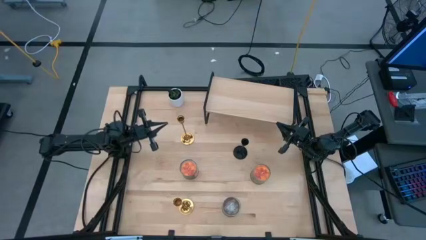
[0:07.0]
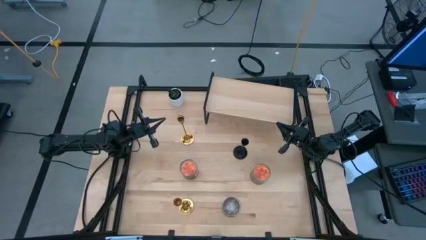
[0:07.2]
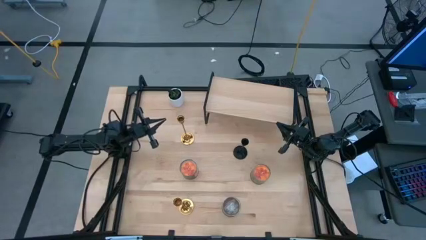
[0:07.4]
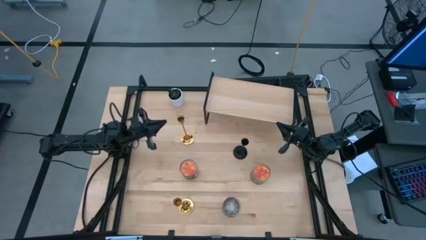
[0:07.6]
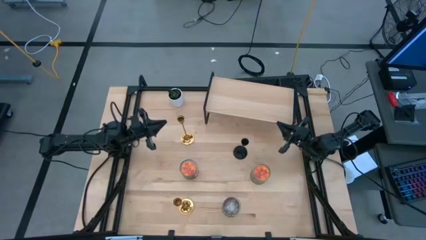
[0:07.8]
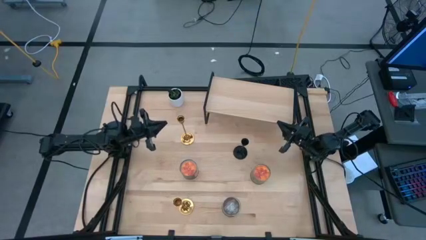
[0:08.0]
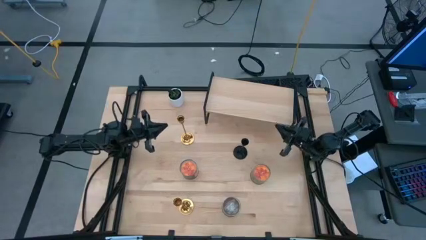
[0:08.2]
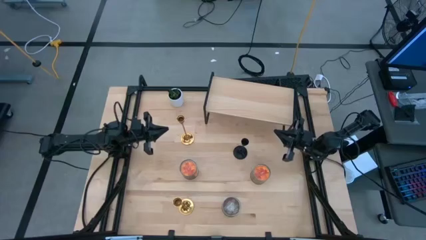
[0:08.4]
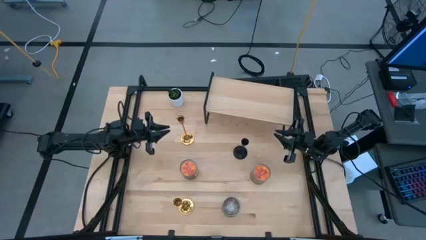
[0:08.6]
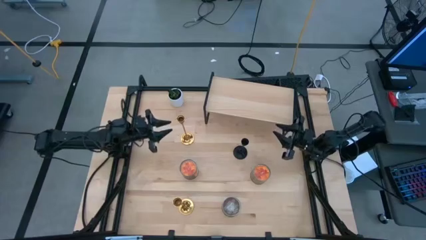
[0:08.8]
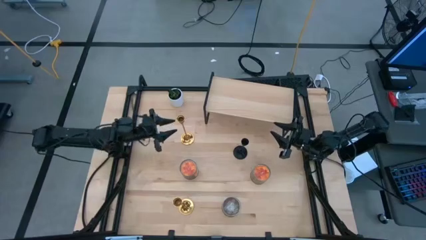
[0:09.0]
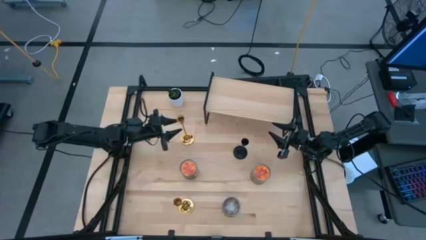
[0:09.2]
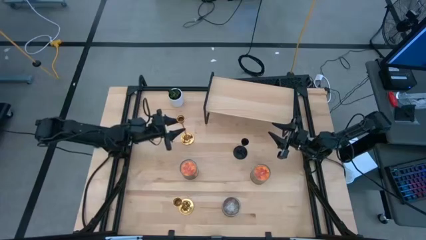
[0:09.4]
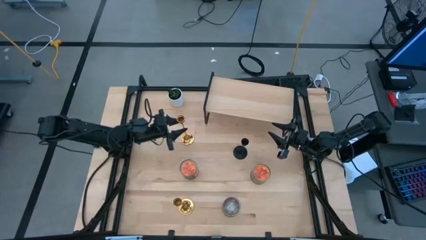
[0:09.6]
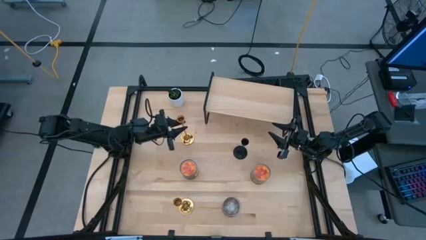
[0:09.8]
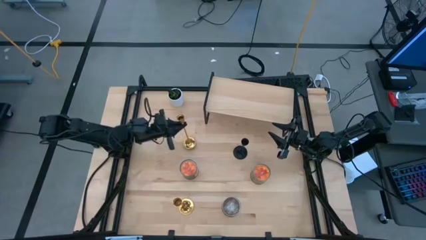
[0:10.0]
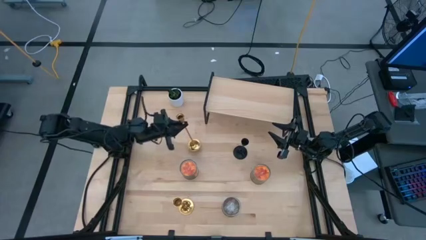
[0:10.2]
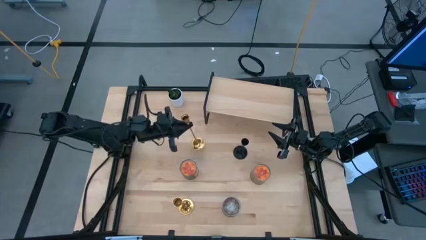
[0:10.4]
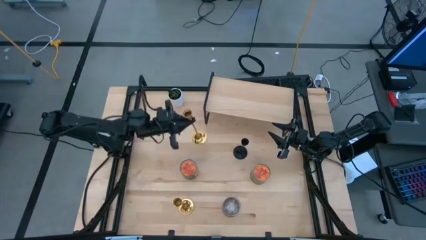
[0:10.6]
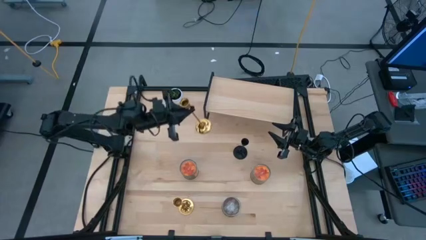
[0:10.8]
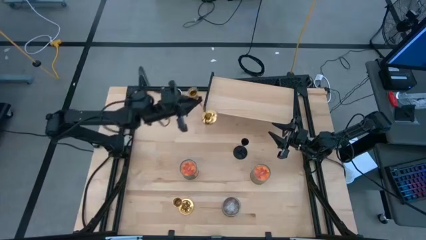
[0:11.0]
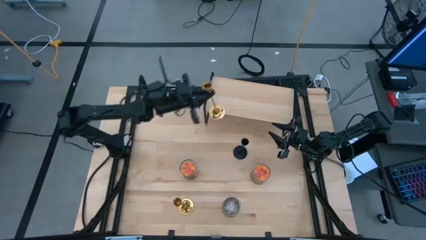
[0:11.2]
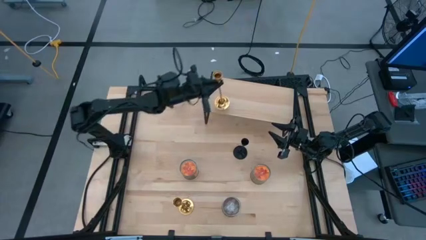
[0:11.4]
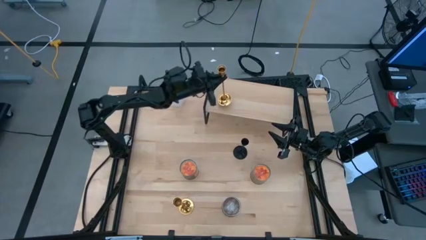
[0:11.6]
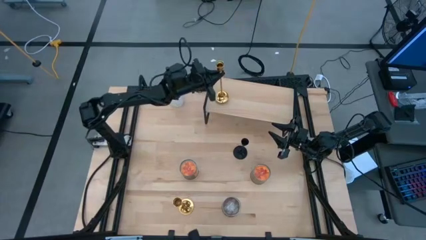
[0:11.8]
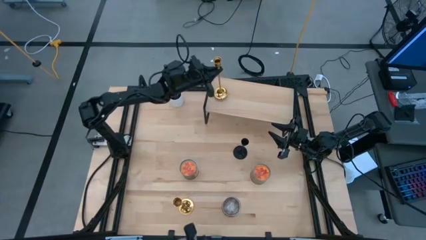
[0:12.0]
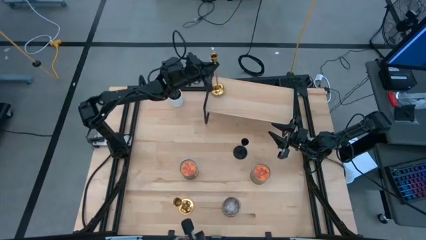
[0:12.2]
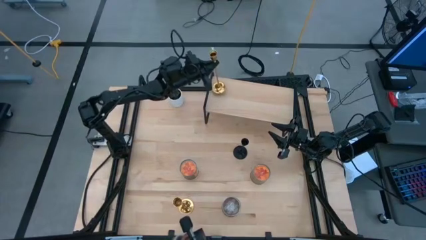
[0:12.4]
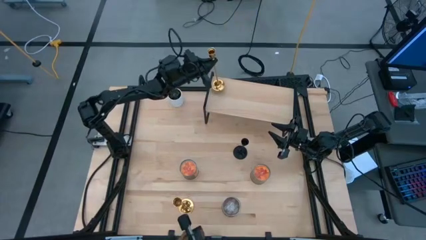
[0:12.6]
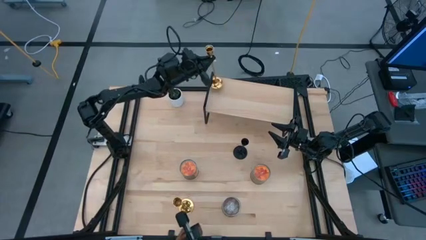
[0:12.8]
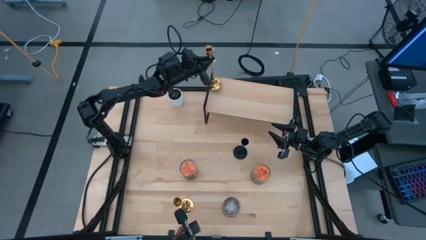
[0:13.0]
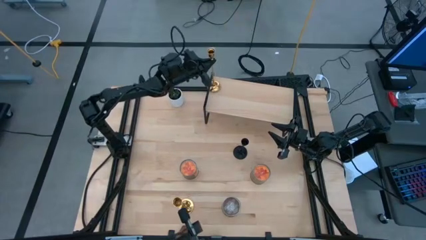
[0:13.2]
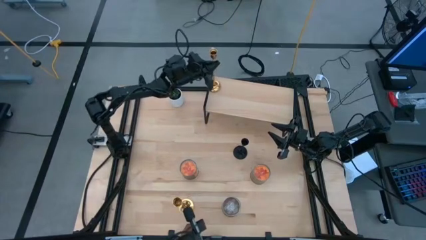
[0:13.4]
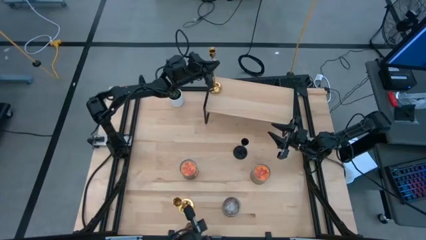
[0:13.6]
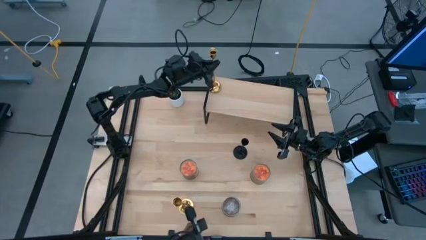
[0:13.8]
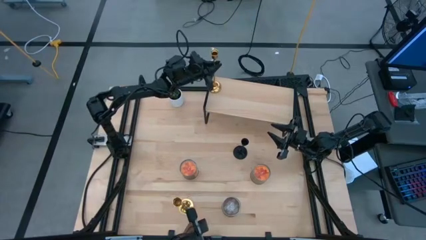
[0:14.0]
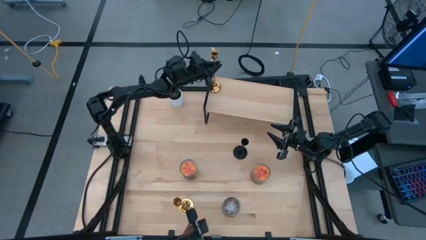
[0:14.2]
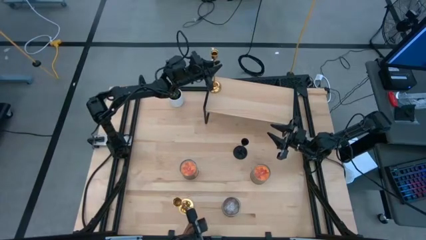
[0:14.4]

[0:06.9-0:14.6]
Task: Pick & Place candle stick holders
Put the top golden candle holder on the shelf

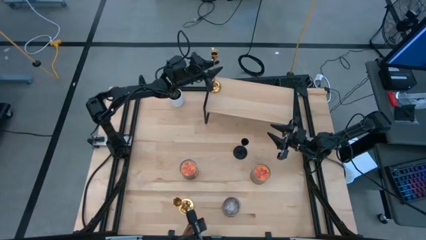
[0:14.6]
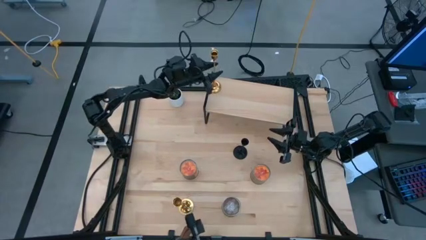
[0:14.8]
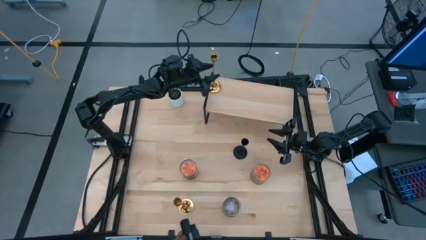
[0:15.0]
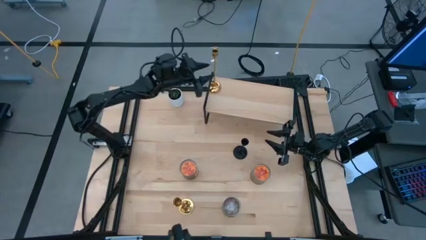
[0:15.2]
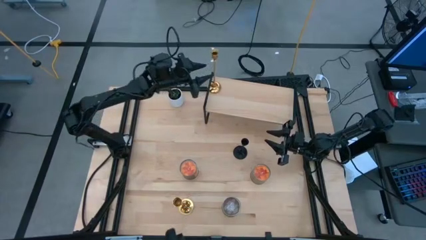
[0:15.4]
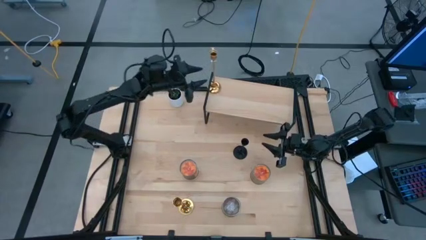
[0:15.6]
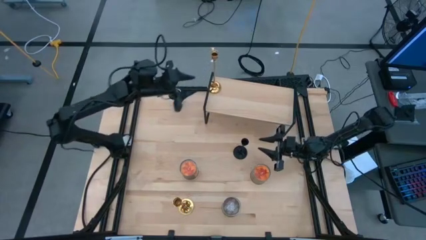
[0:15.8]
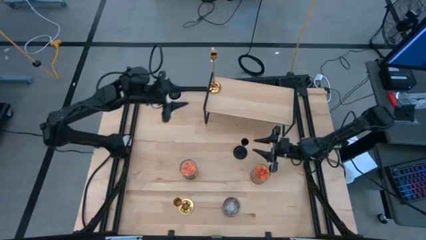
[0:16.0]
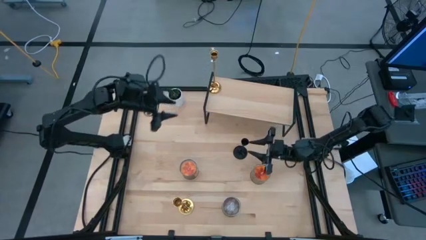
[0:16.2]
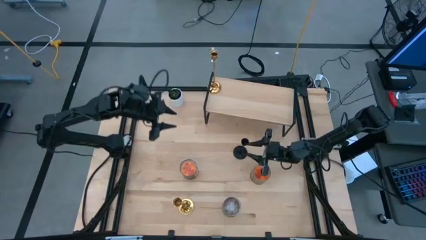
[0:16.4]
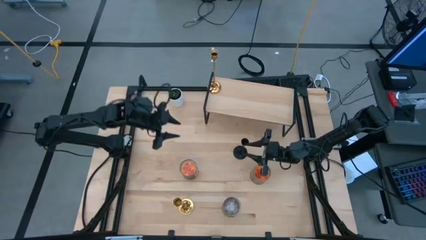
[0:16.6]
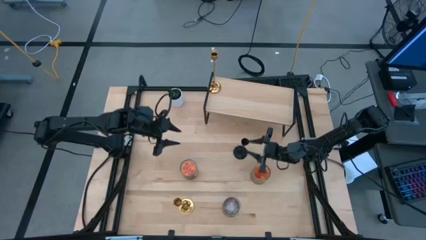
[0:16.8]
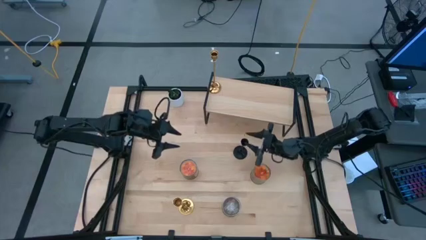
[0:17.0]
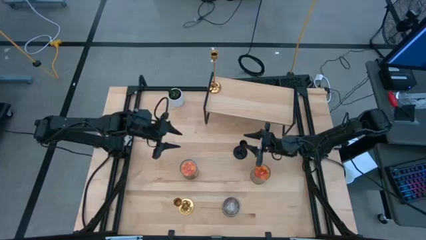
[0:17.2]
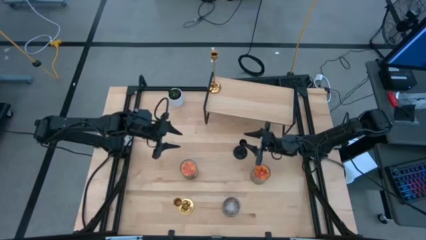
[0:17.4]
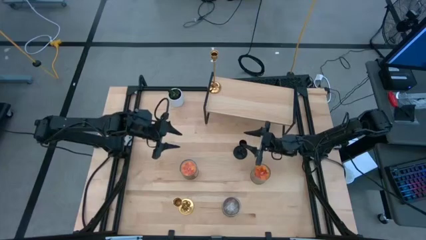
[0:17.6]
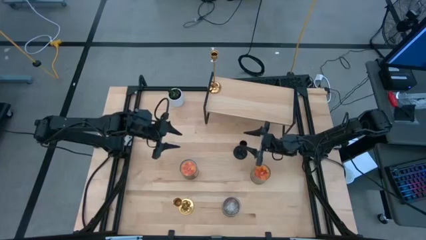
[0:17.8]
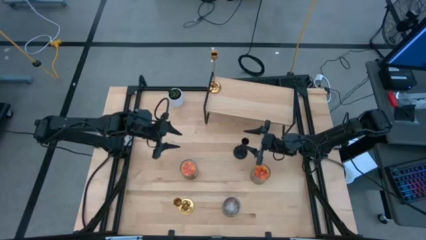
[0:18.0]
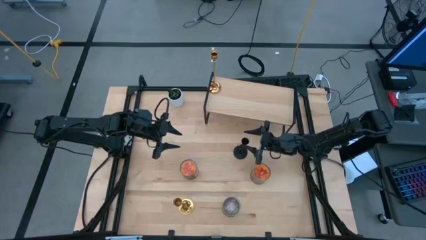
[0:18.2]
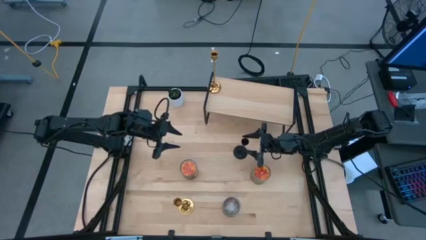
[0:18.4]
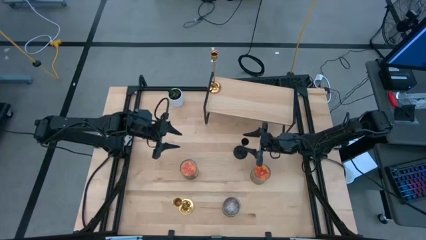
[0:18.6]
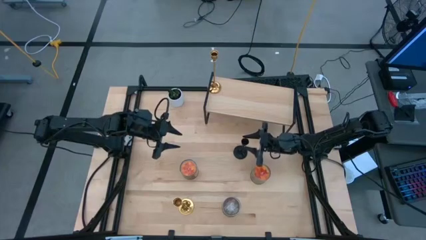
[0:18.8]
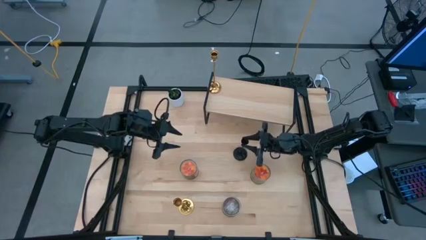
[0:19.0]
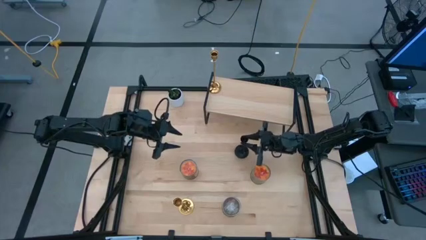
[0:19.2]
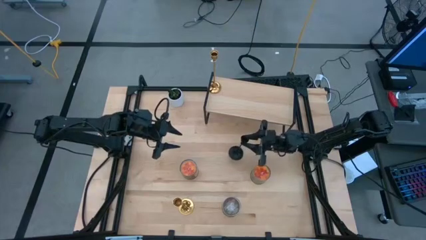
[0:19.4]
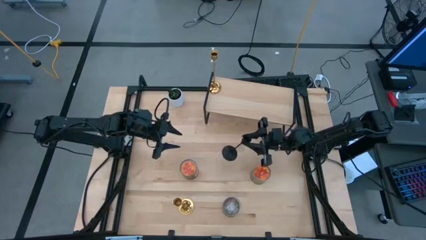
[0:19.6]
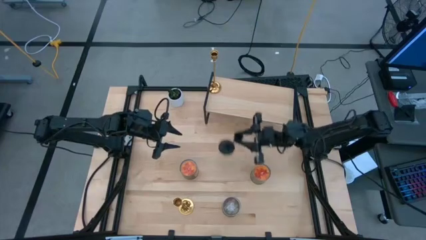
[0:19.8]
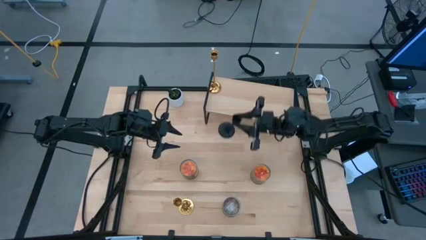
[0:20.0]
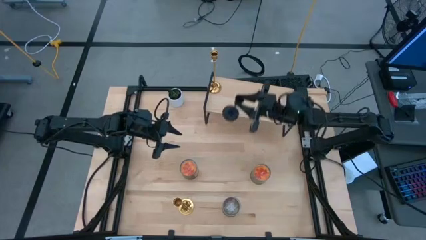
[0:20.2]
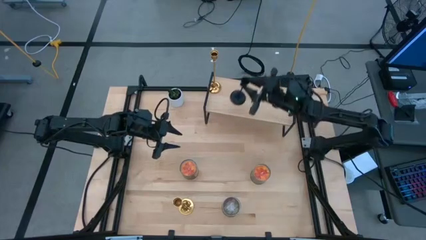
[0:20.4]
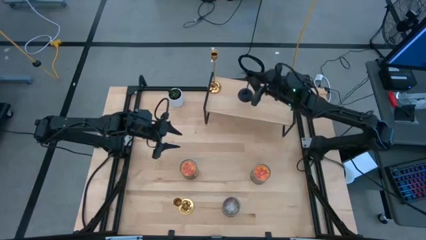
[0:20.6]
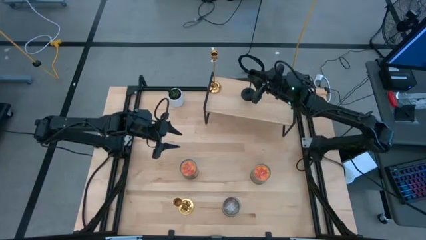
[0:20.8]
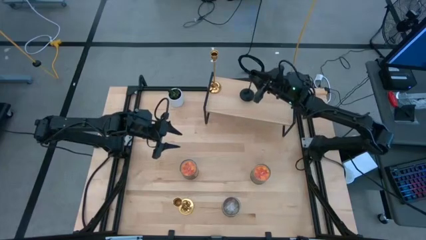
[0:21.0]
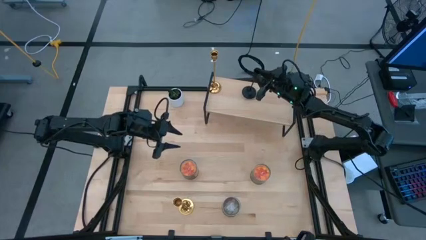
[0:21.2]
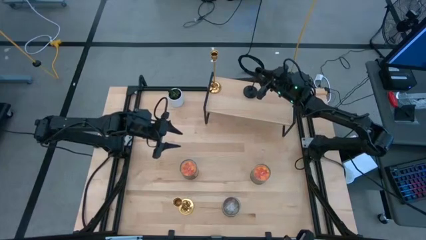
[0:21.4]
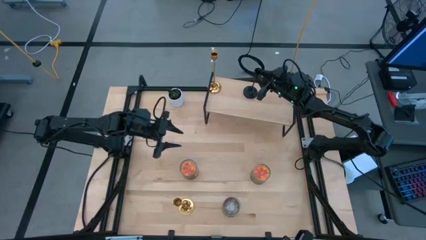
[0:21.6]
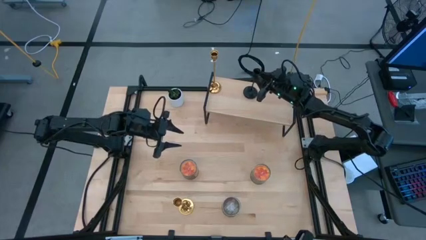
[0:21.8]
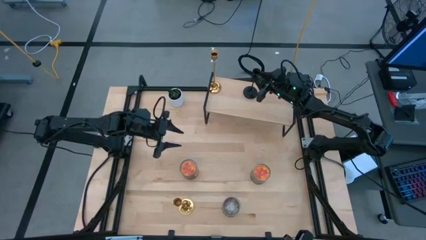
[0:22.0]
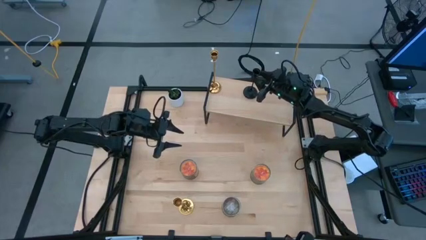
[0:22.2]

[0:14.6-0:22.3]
Put the black candle holder on the shelf

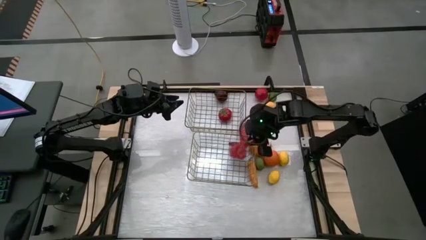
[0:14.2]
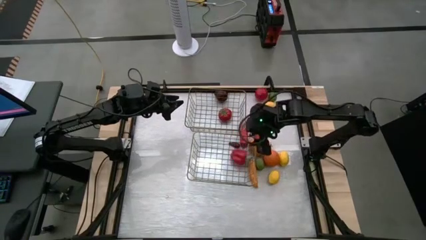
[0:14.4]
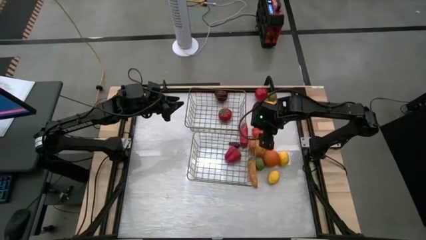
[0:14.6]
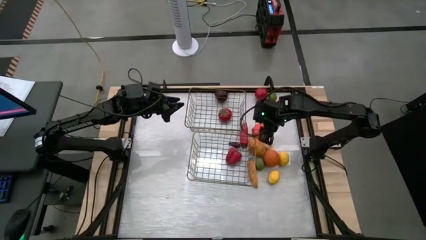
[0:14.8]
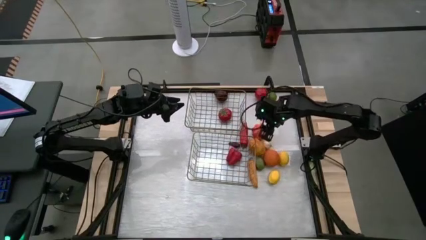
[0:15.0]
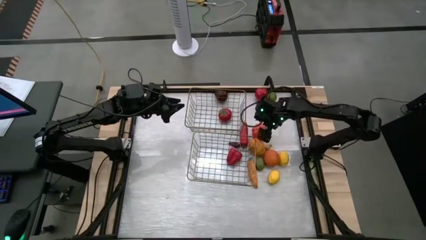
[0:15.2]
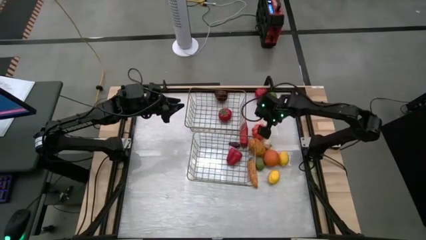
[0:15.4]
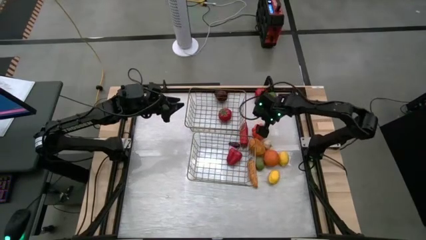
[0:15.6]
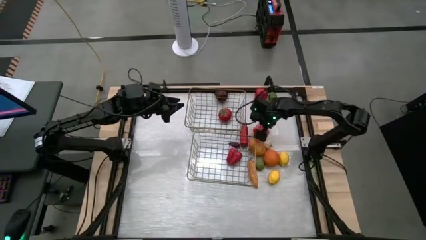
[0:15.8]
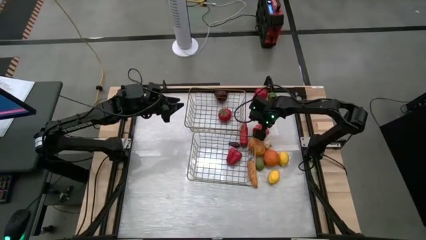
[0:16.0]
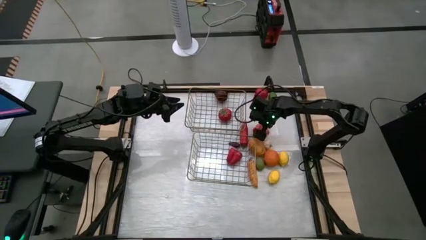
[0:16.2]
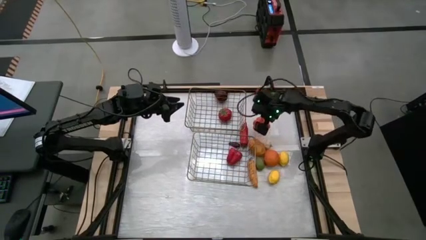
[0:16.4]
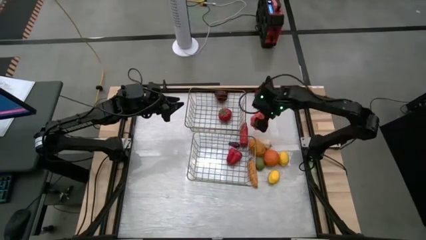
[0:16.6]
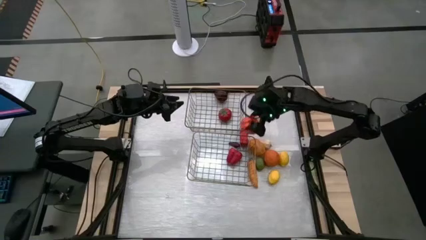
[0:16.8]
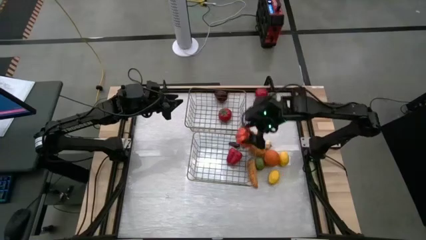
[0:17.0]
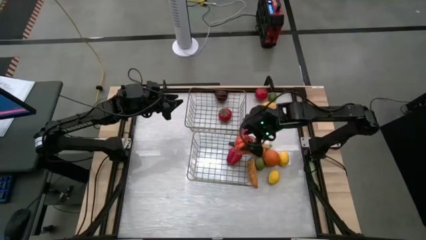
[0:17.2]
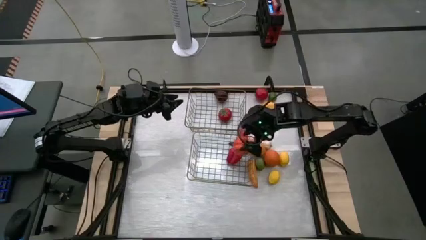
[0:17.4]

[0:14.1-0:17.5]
Task: Sort produce into baskets
Put the orange squash vegetable into the bottom wire basket
